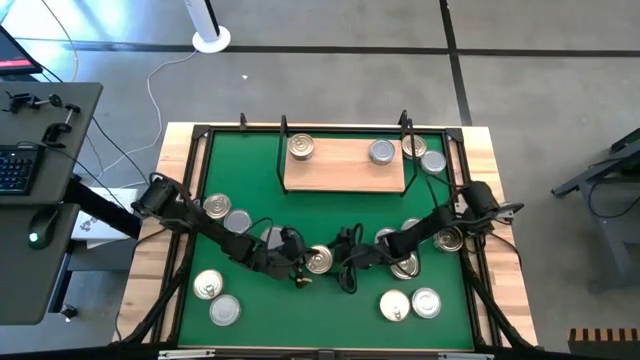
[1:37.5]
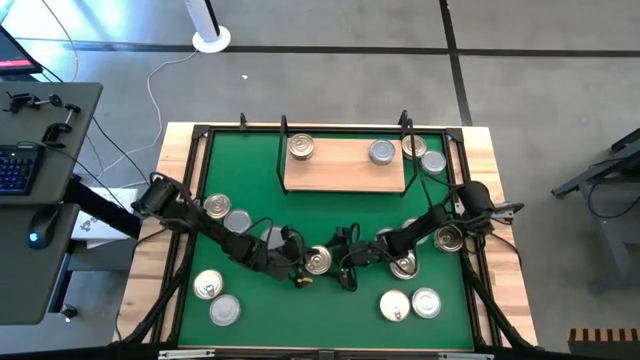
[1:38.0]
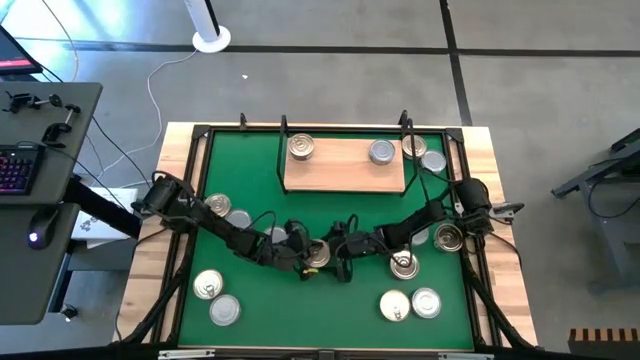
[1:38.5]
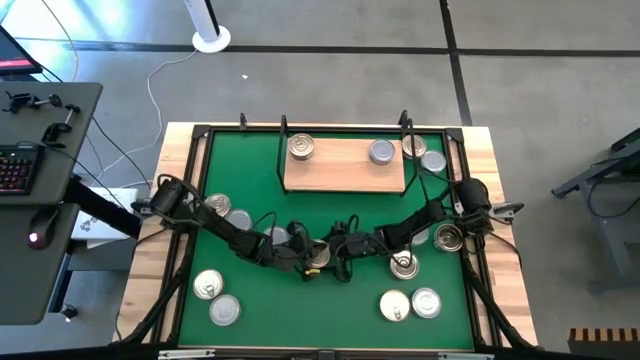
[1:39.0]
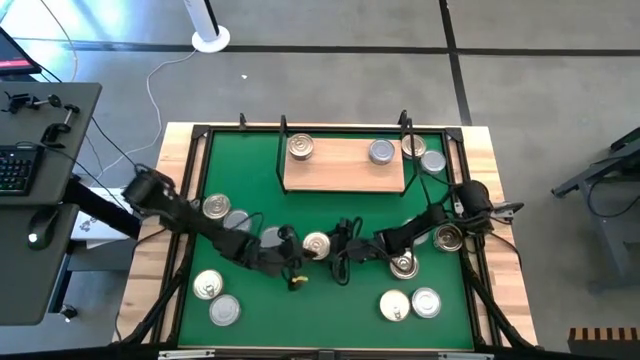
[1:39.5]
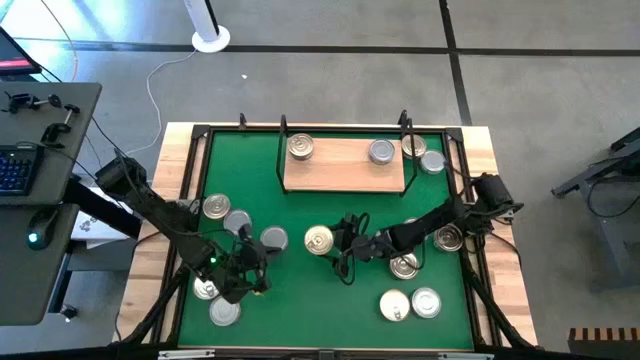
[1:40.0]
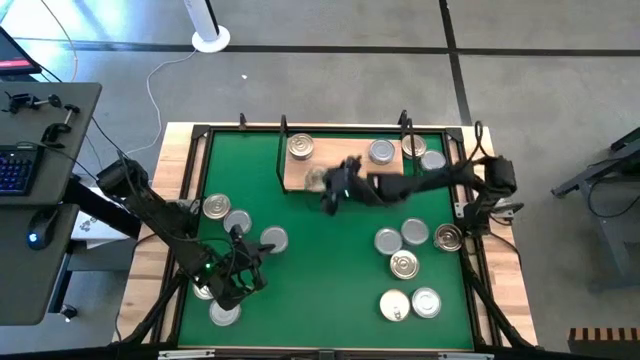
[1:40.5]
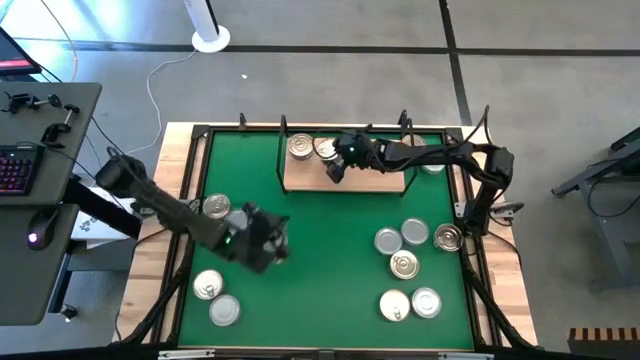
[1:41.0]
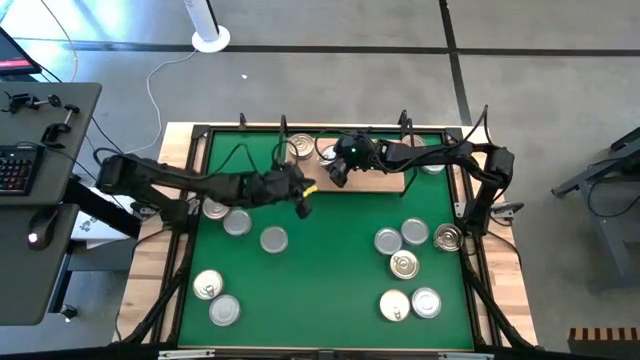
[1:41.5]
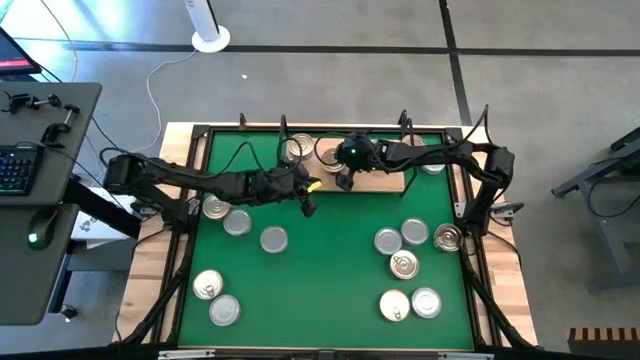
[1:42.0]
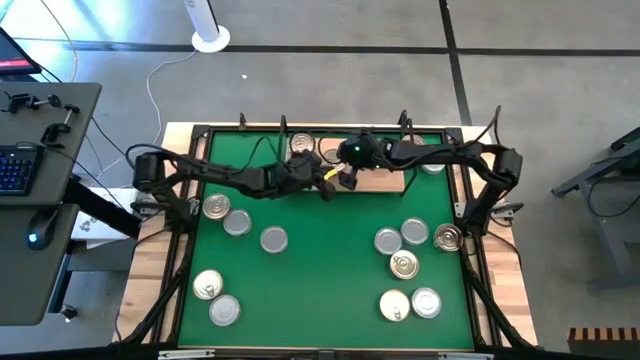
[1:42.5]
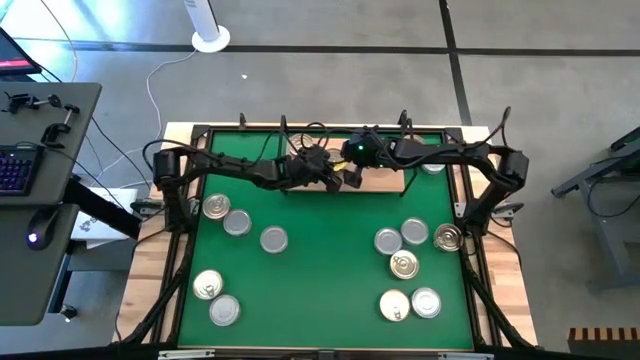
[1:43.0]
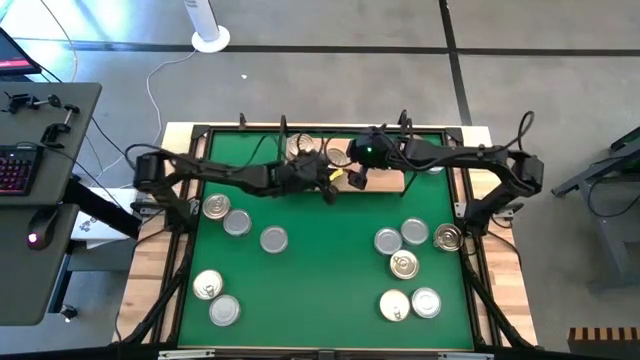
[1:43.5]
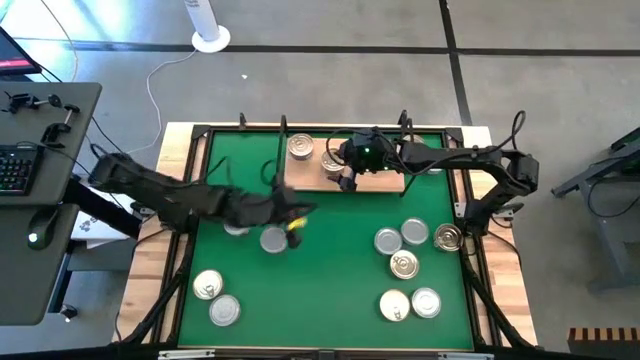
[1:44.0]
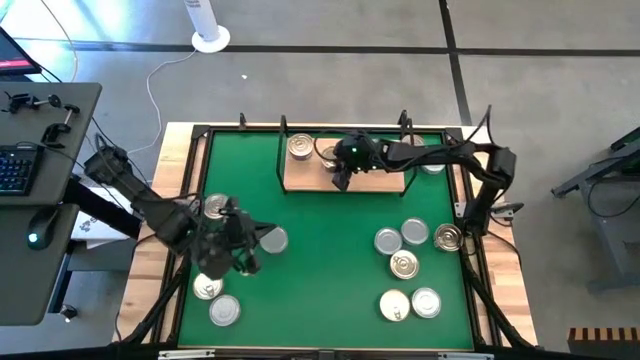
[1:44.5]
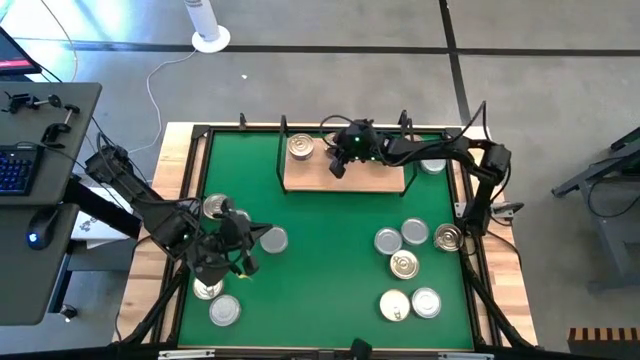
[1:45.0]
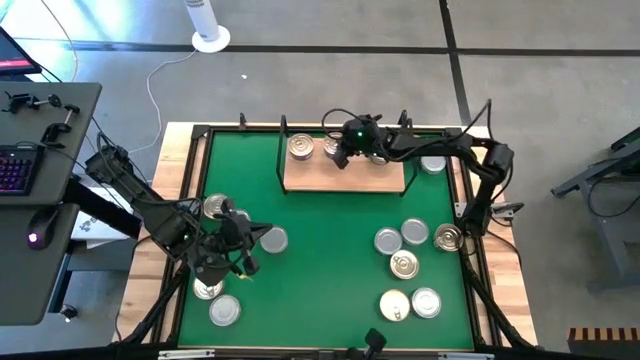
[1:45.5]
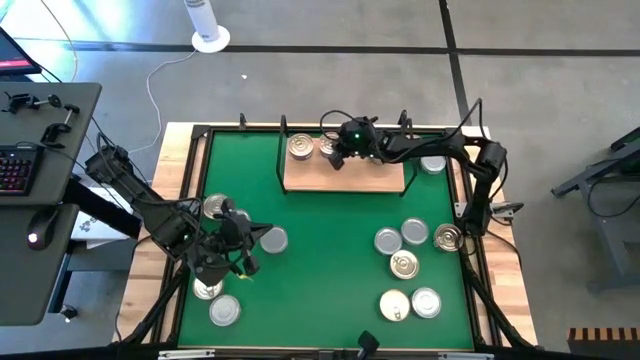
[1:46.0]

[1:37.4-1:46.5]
Task: Stack canned seafood by type on shelf
Put the blue/pink tuna can on the shelf

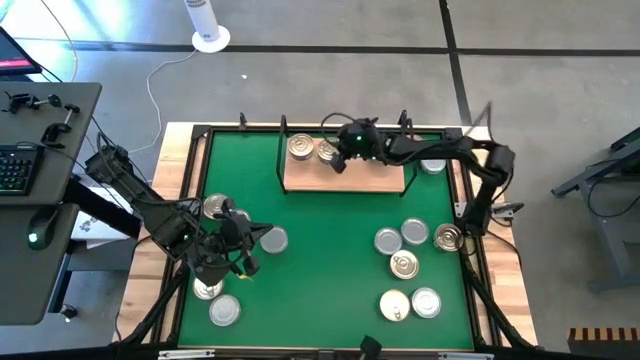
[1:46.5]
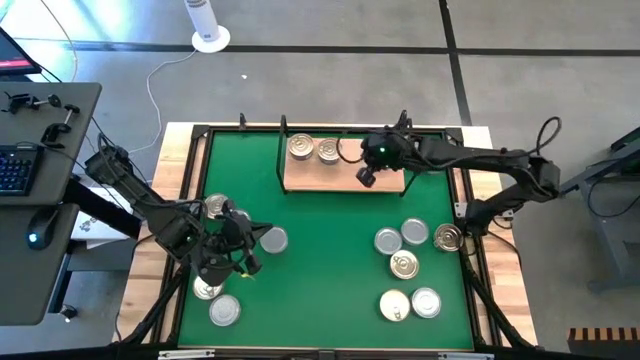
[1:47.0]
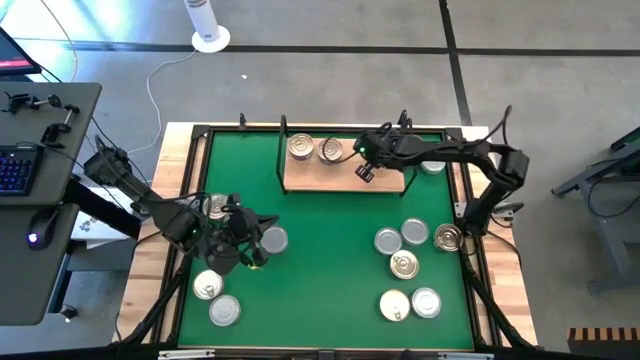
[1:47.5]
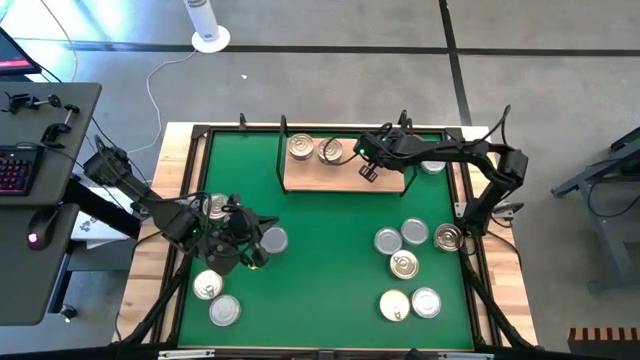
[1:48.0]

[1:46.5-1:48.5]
Adjust the green tuna can on the shelf

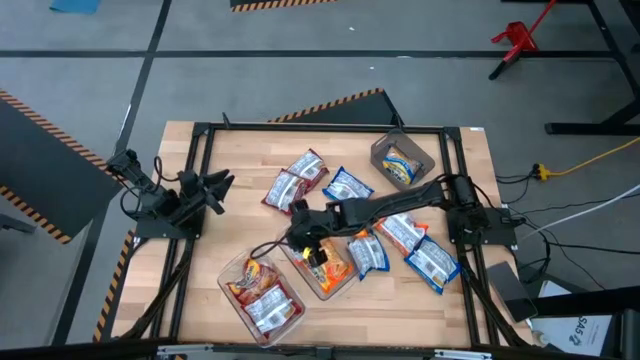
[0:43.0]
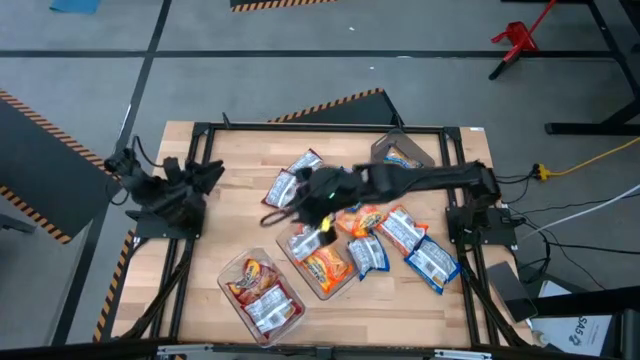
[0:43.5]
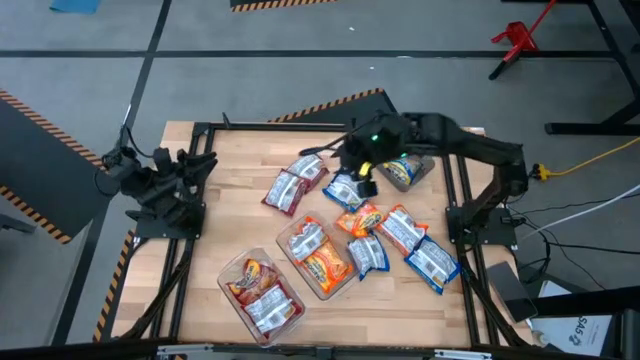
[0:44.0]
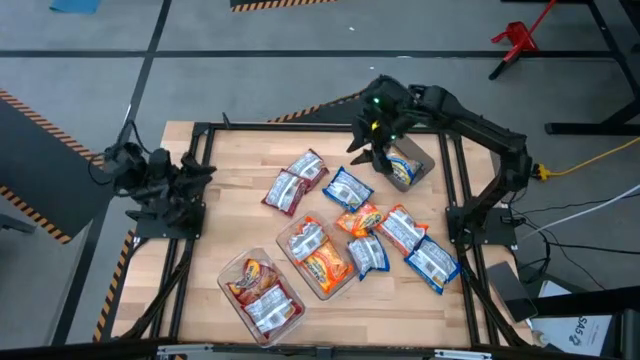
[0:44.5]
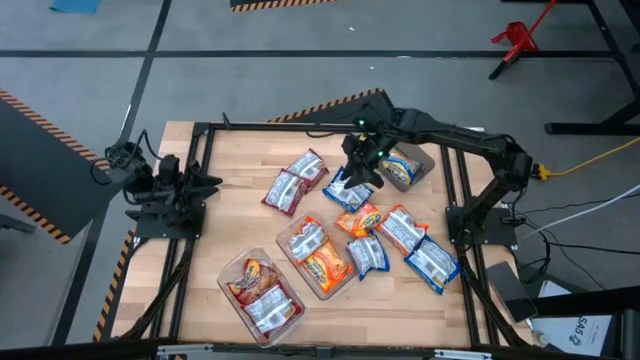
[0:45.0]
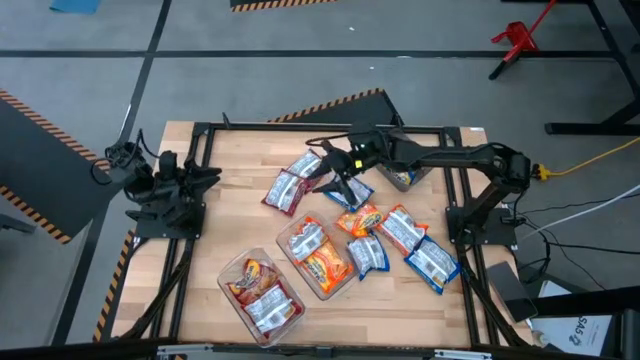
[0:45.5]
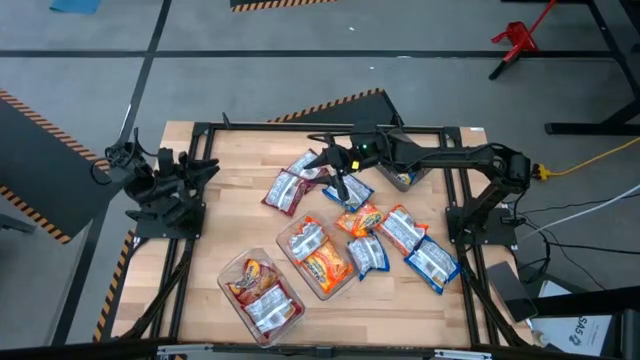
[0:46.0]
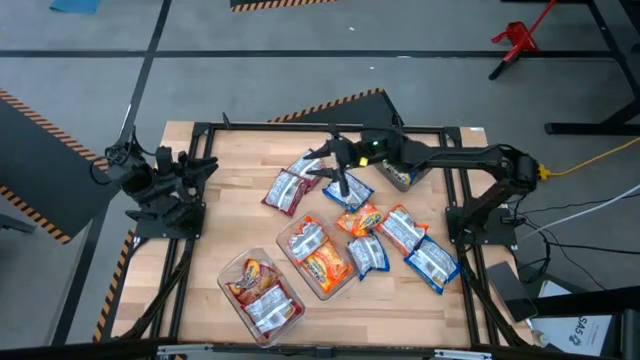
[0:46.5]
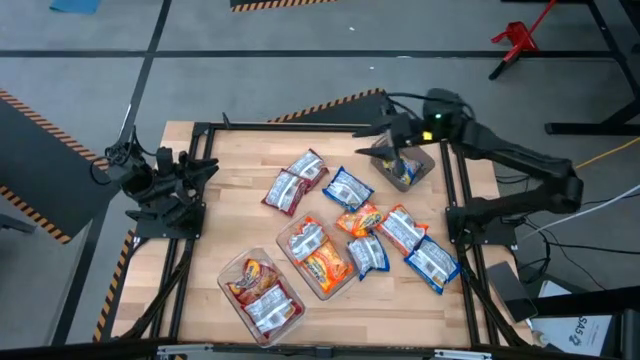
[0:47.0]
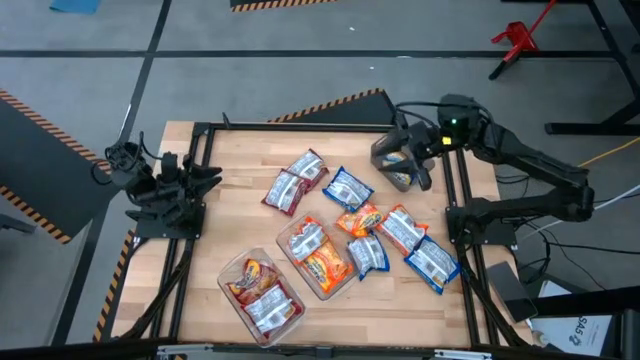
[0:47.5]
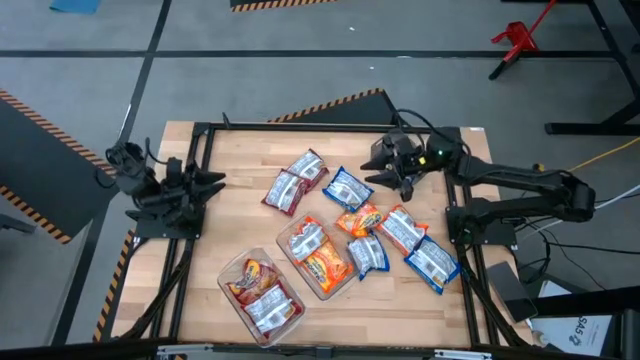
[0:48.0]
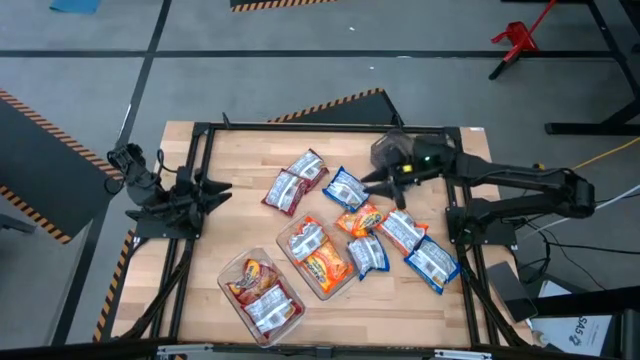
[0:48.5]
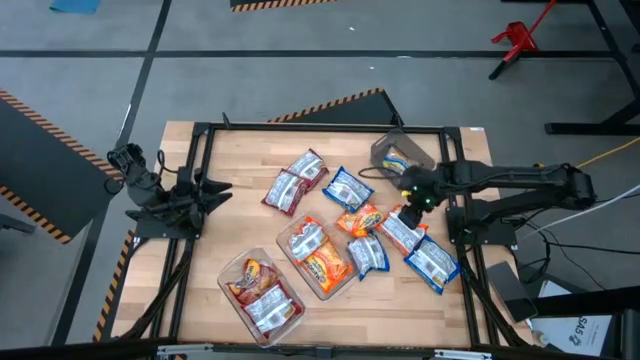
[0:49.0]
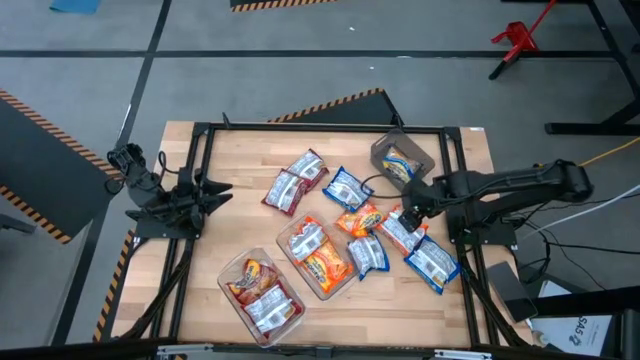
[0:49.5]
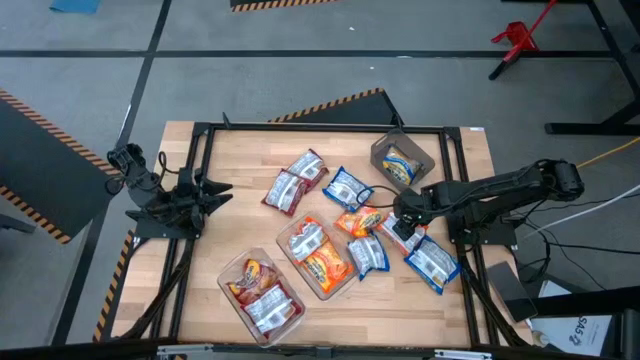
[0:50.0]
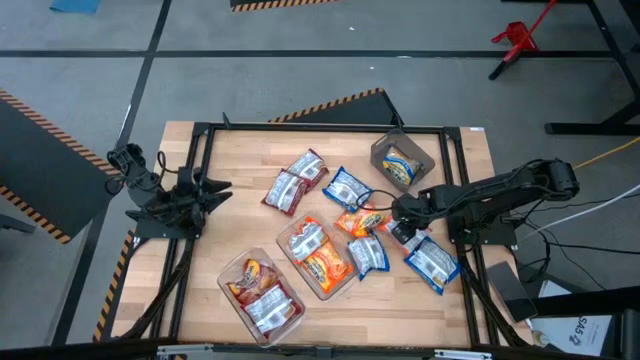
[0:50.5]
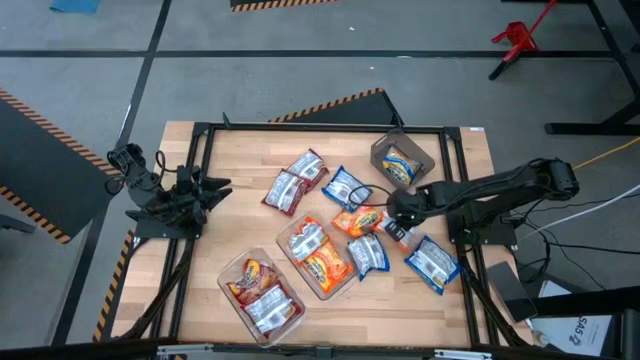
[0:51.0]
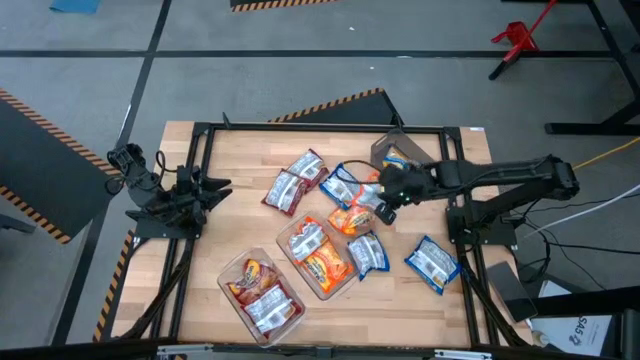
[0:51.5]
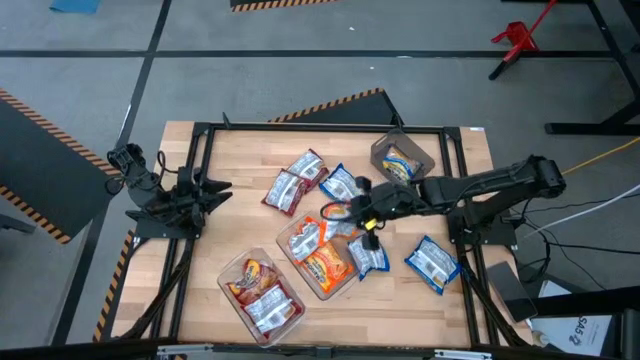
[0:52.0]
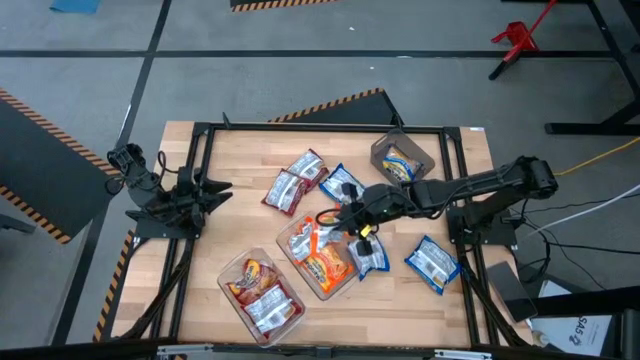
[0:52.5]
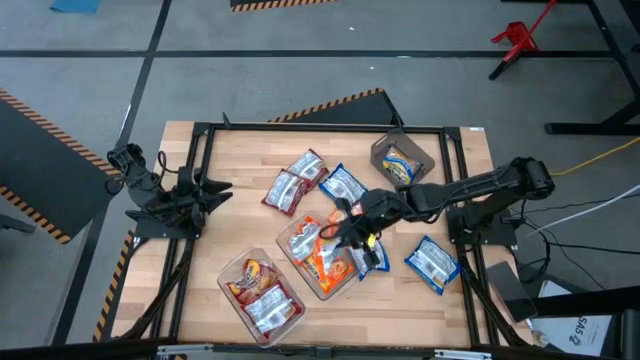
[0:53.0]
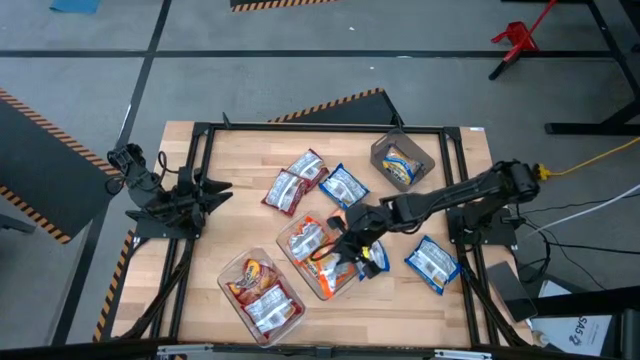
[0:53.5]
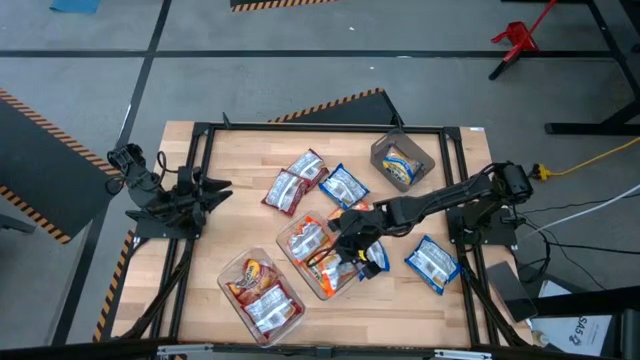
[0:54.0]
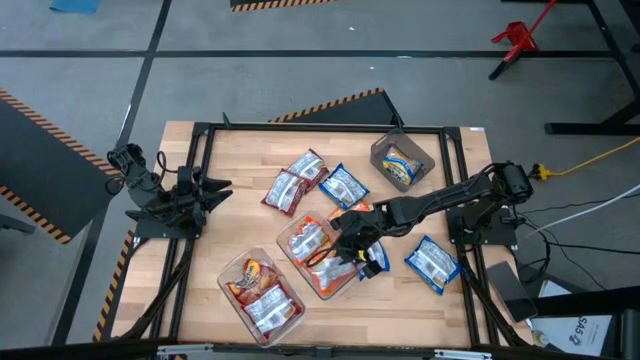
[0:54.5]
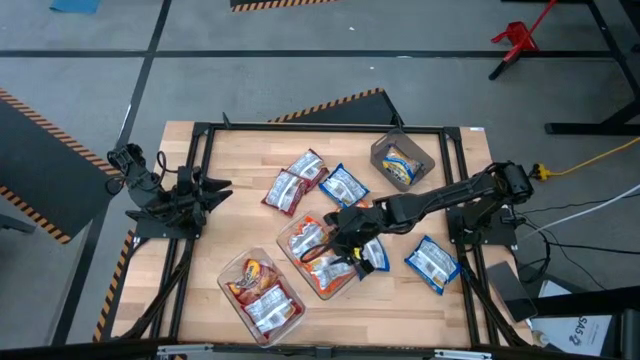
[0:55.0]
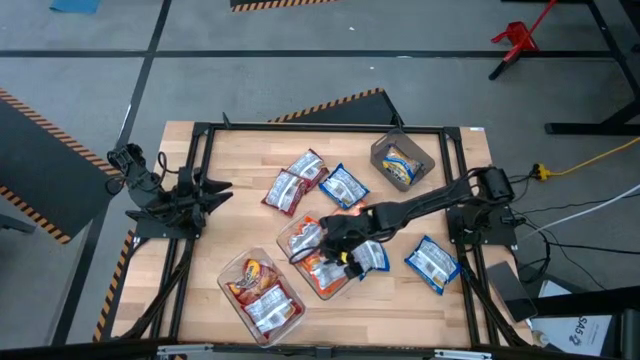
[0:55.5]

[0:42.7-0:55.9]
Task: Sort Maruchan noodles
Put the orange noodle pack into the top transparent bin
